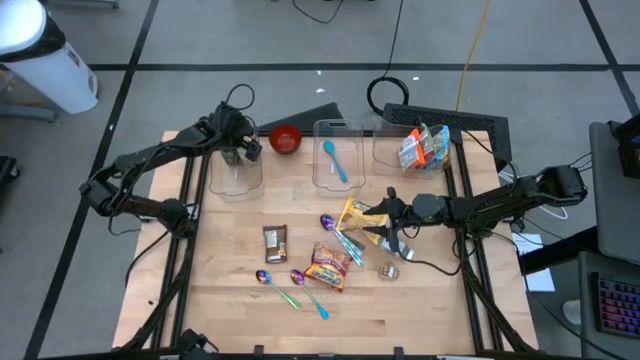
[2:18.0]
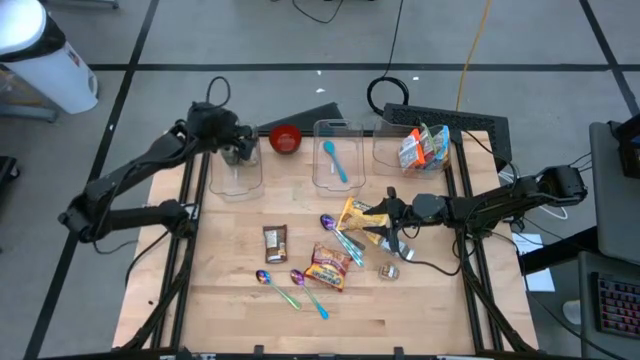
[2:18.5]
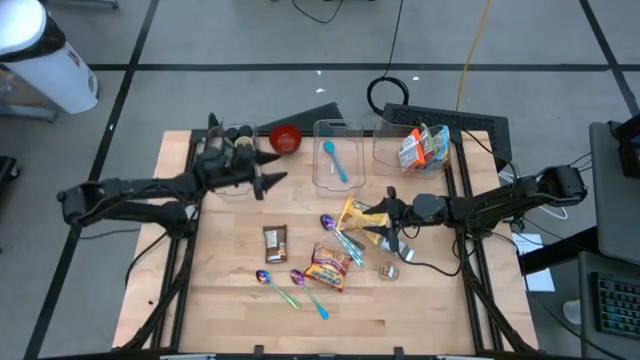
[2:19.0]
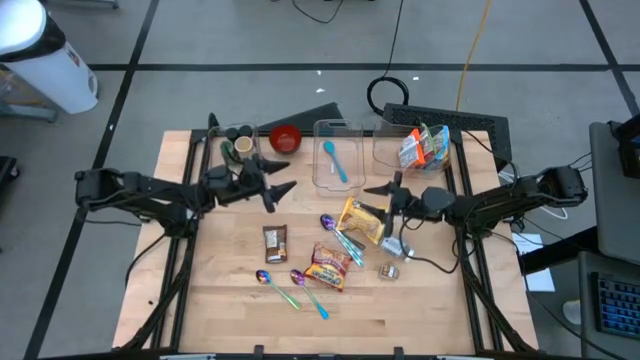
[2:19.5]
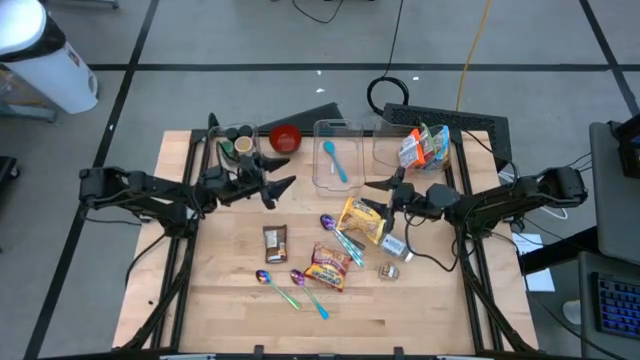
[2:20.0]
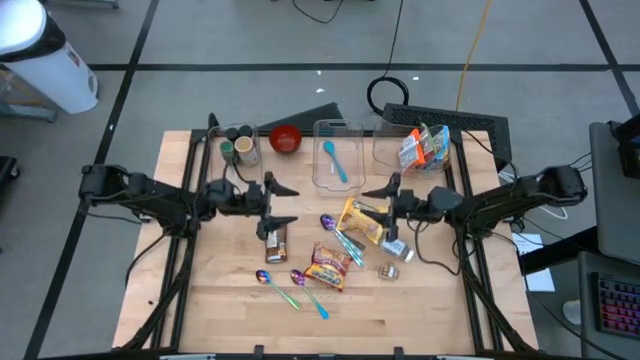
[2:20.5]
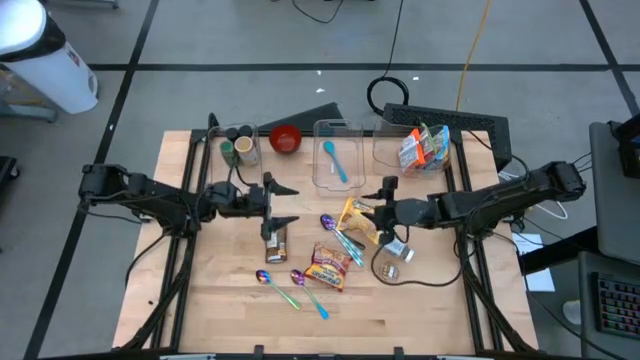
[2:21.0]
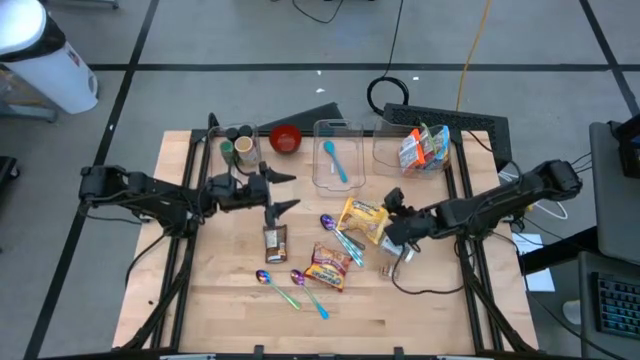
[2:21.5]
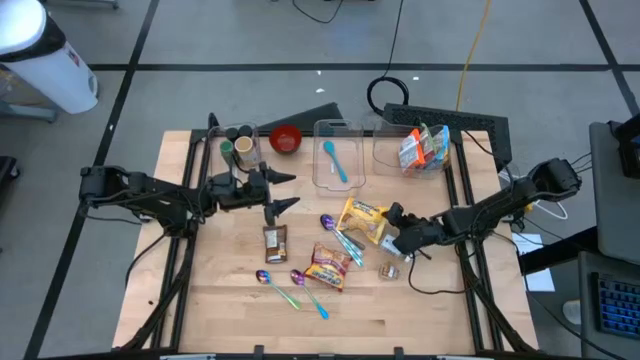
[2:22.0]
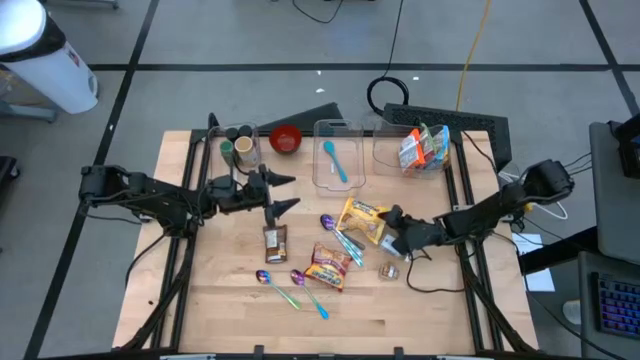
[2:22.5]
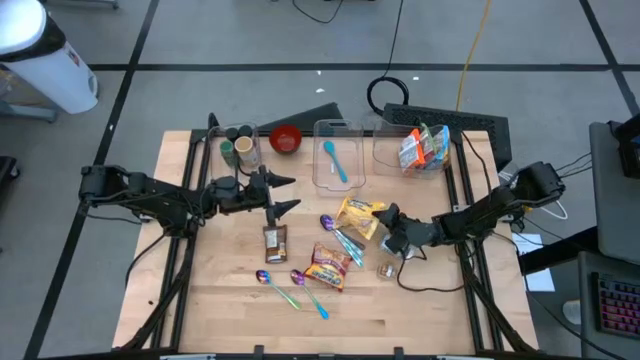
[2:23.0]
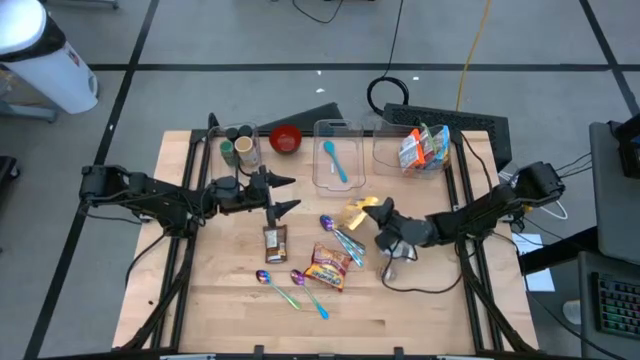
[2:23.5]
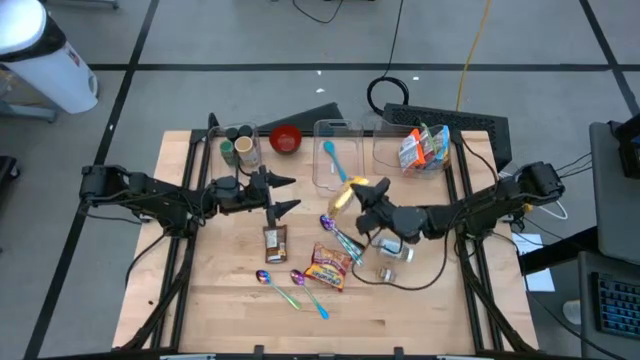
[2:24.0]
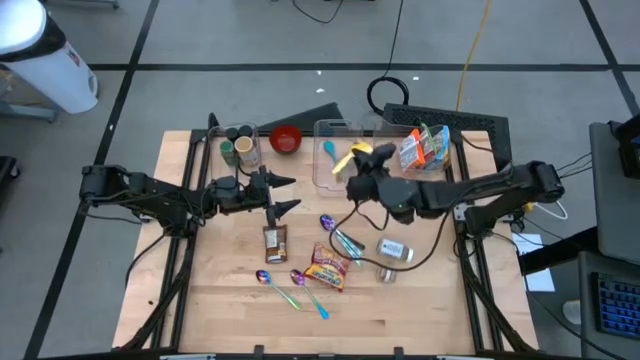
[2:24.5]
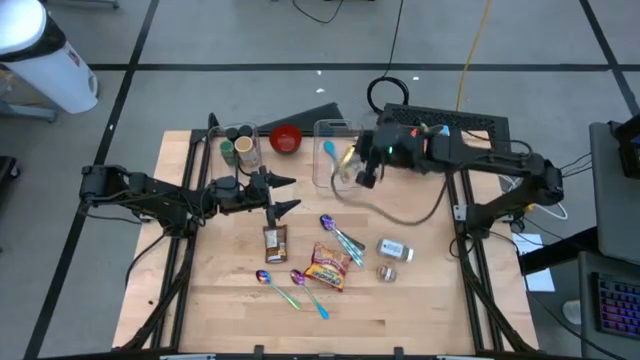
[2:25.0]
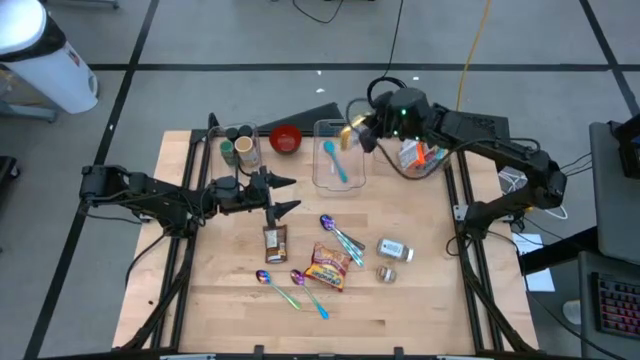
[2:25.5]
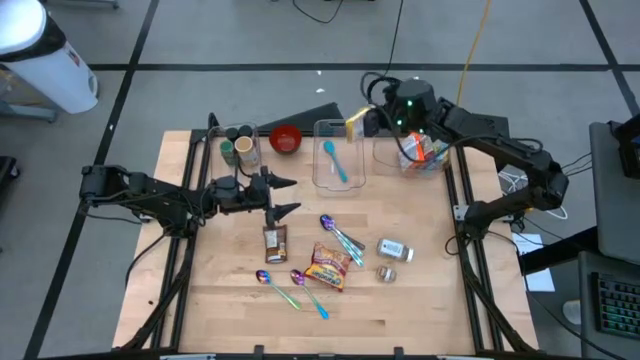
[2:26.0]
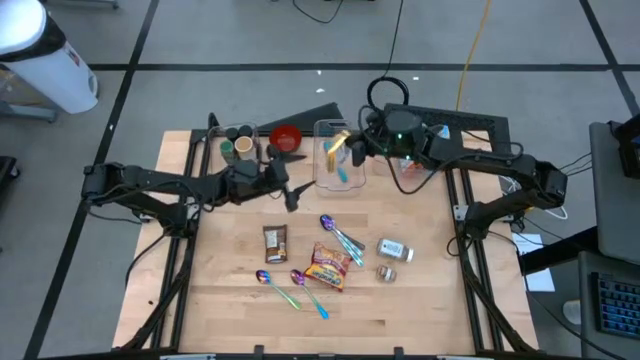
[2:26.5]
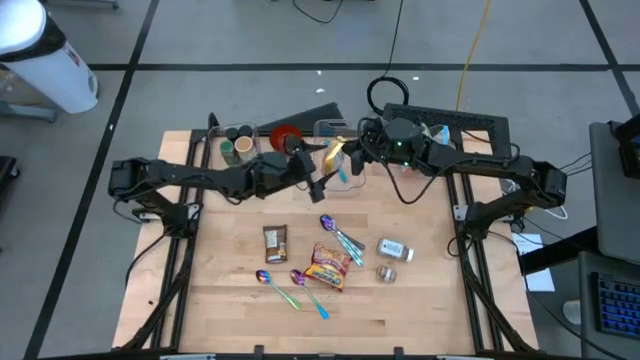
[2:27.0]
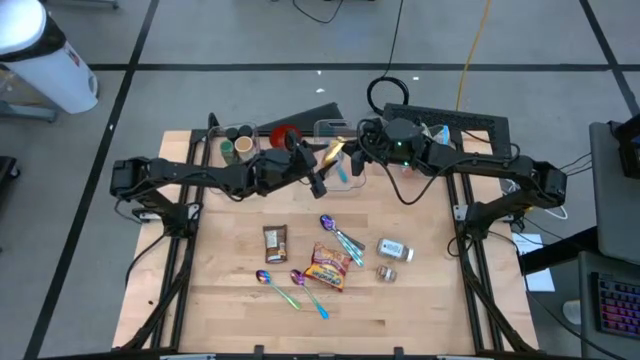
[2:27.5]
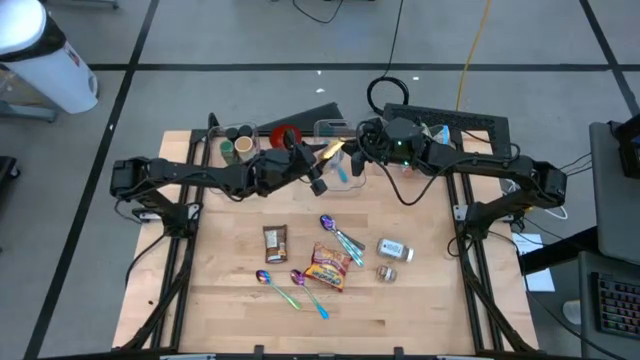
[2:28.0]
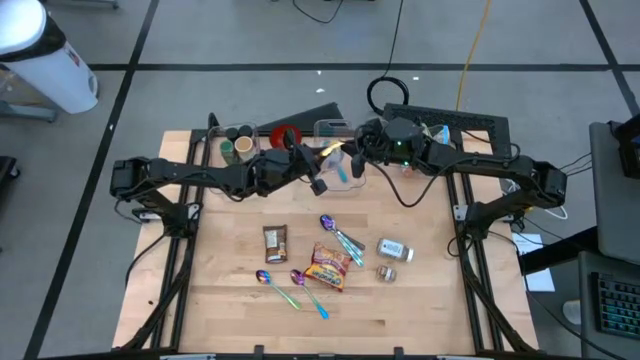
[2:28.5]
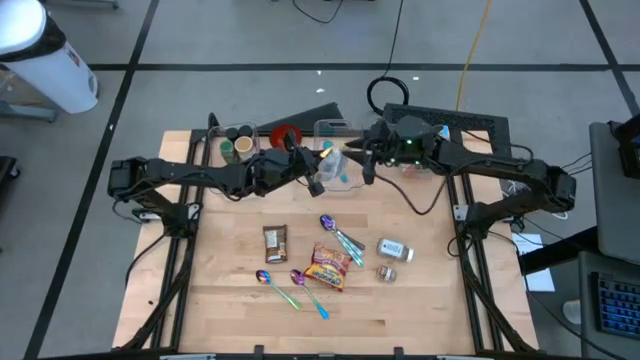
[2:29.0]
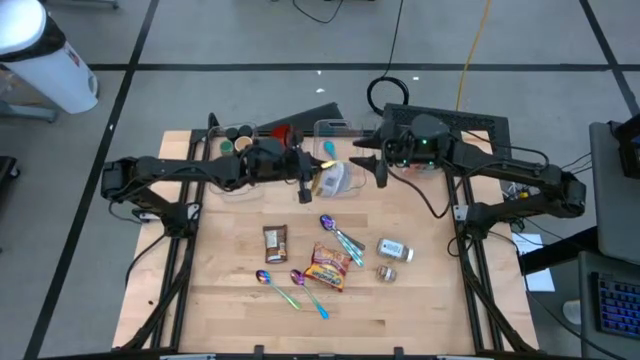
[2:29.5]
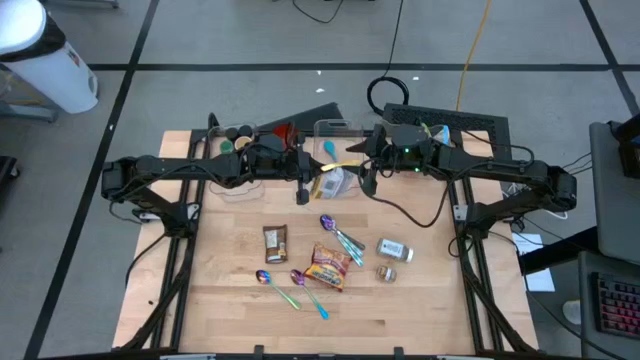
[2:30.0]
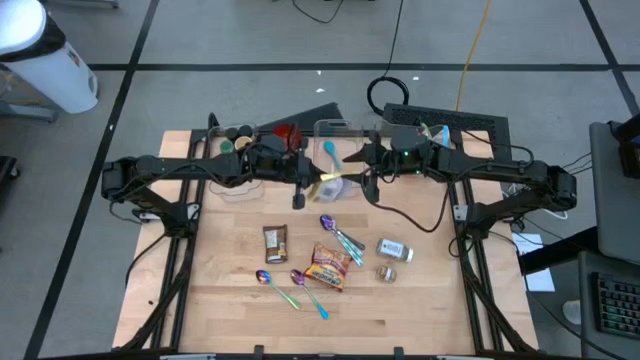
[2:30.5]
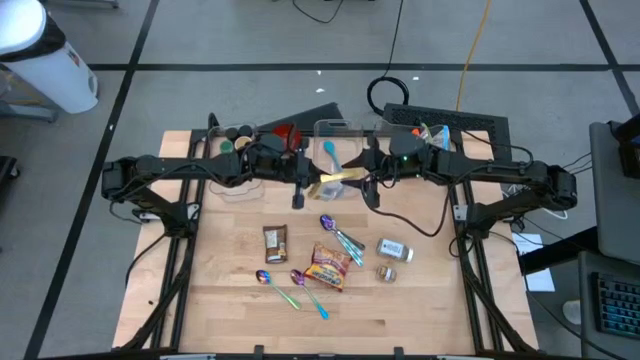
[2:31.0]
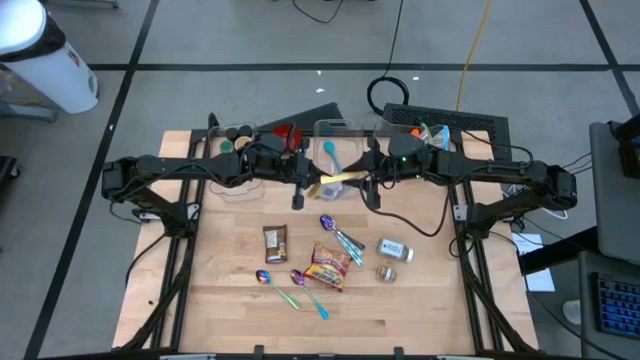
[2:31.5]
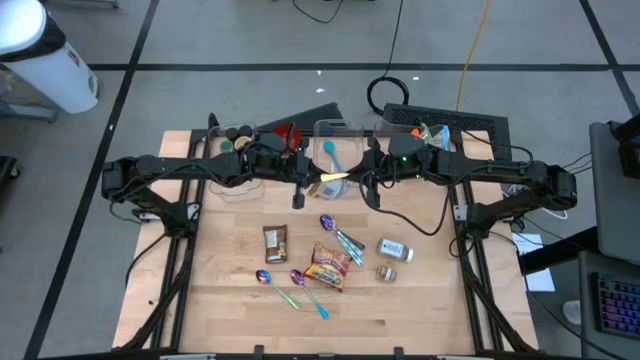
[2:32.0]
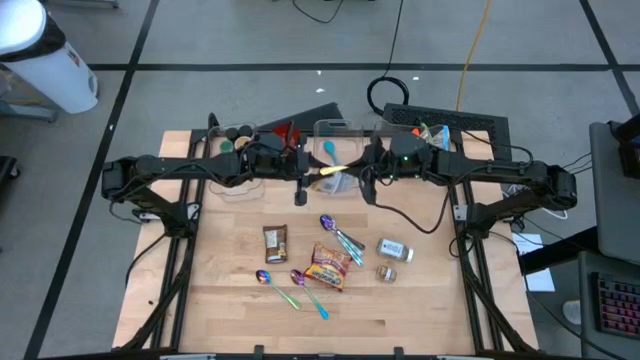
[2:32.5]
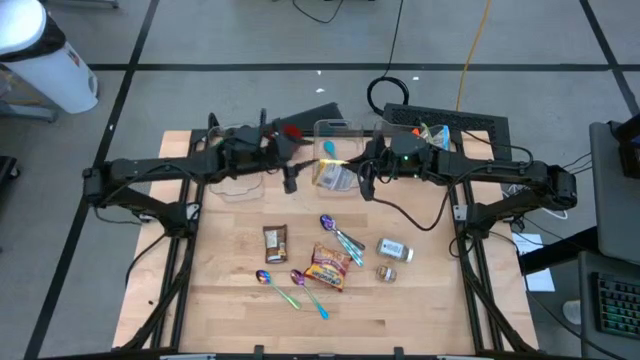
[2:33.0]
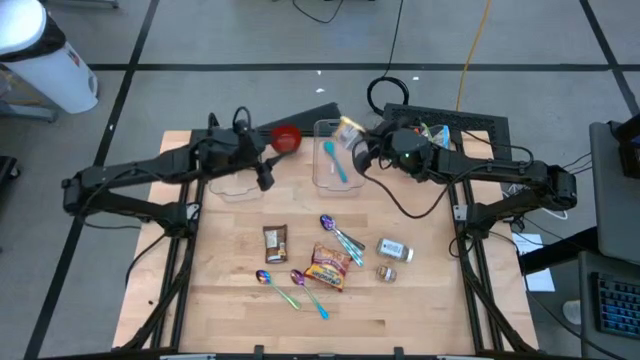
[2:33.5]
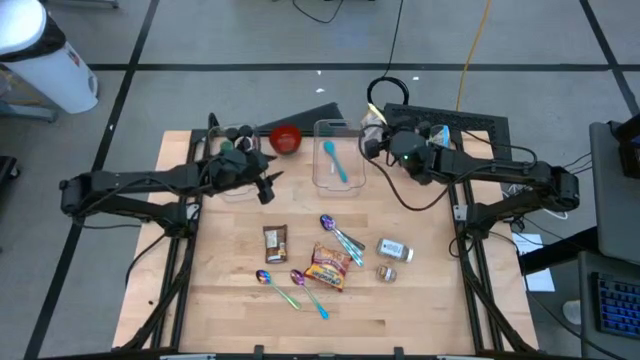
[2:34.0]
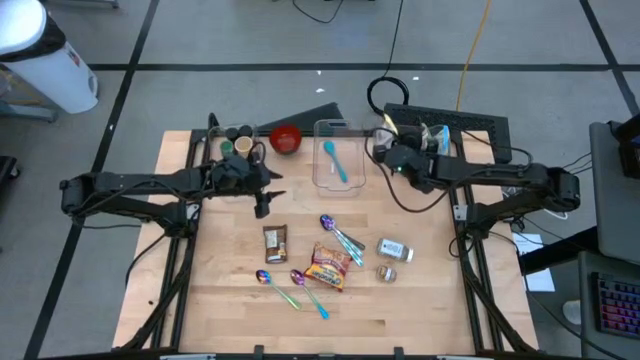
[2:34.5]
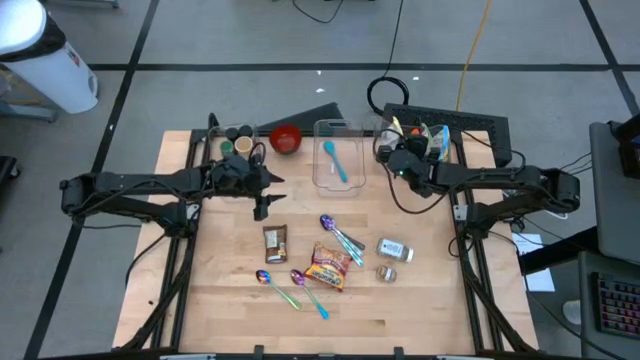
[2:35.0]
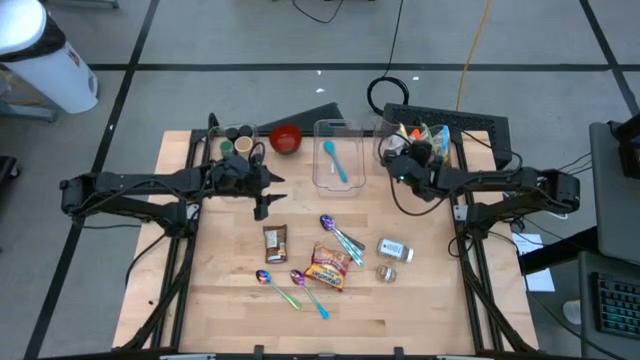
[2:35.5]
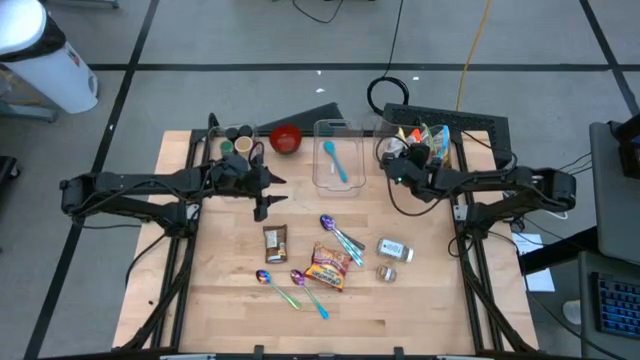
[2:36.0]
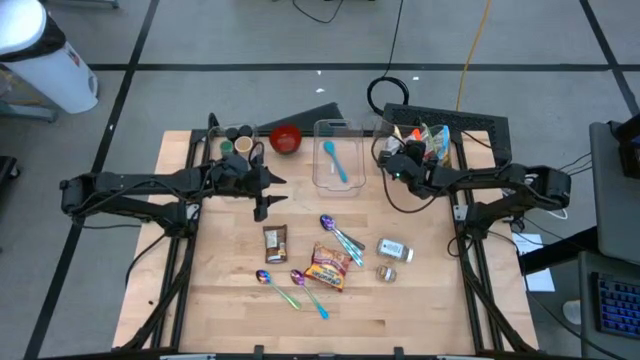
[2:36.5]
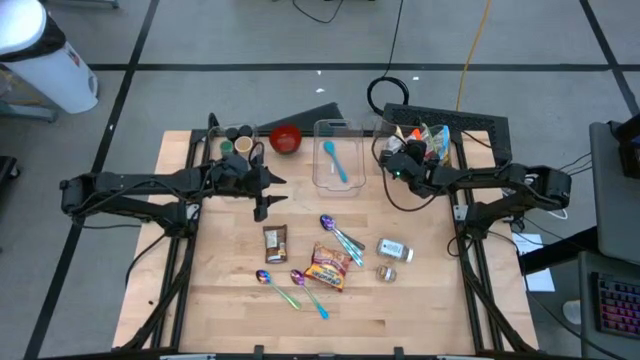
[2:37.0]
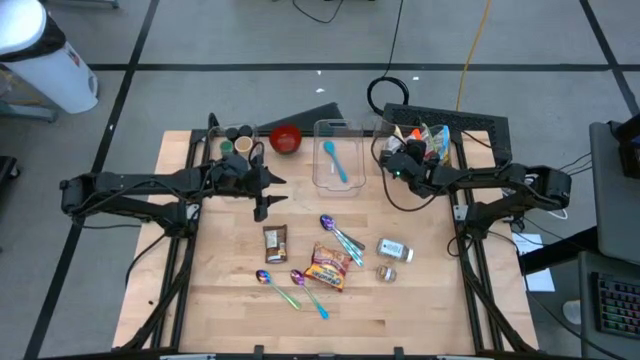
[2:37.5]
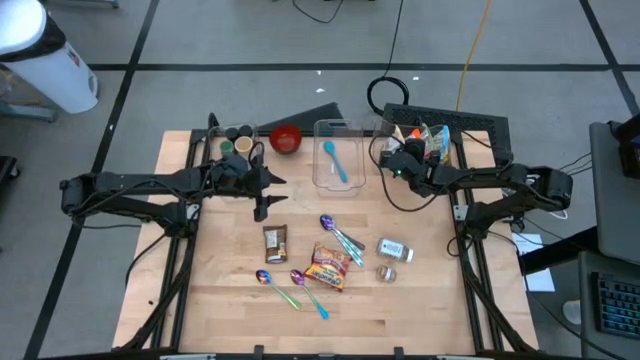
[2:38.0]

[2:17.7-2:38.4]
Task: Pick & Place Food Item
Put the yellow noodle pack into the right transparent bin

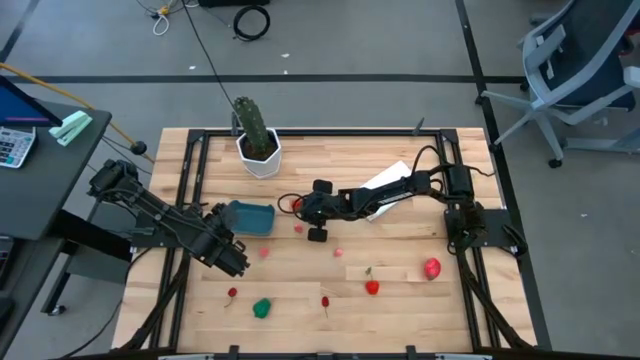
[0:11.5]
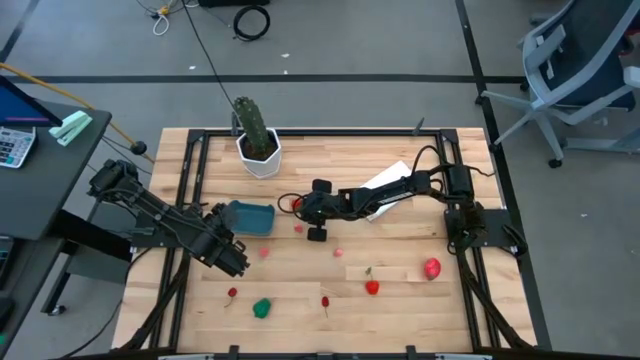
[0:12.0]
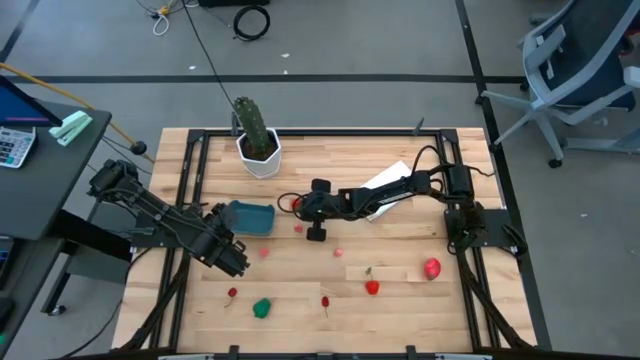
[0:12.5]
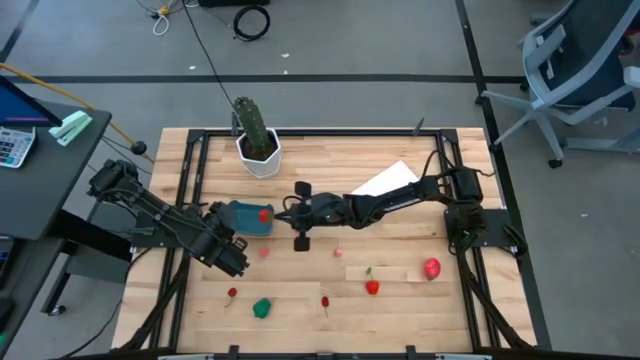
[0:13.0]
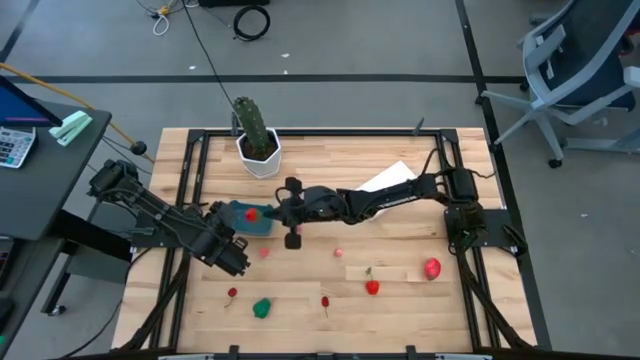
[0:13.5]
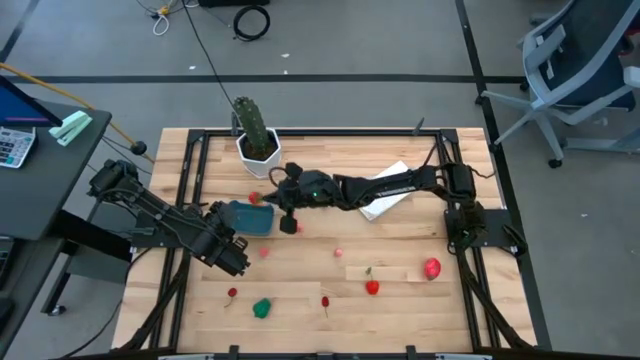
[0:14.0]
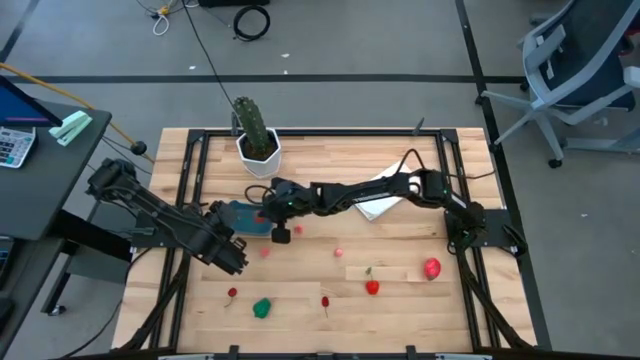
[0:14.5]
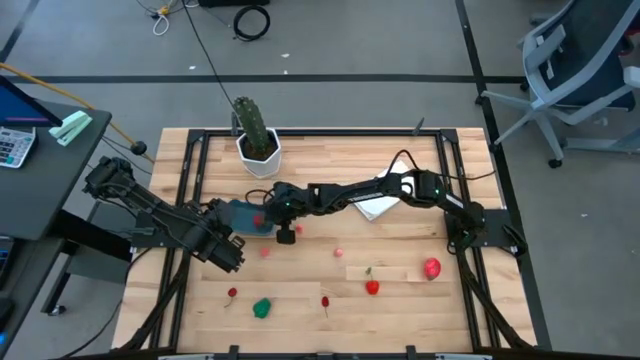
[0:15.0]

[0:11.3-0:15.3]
Task: Pick and placing Produce into tupperware
Put the top red strawberry into the blue bin
